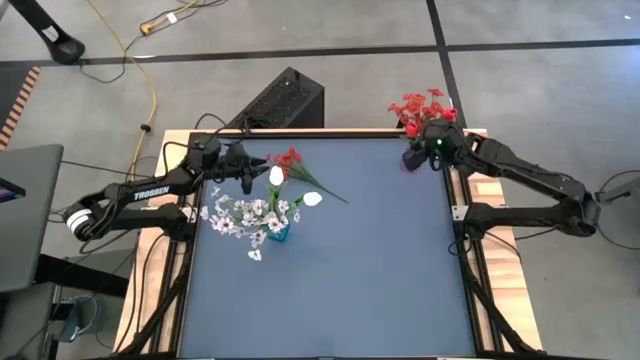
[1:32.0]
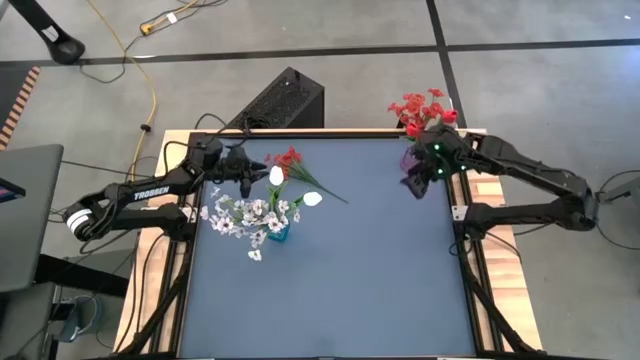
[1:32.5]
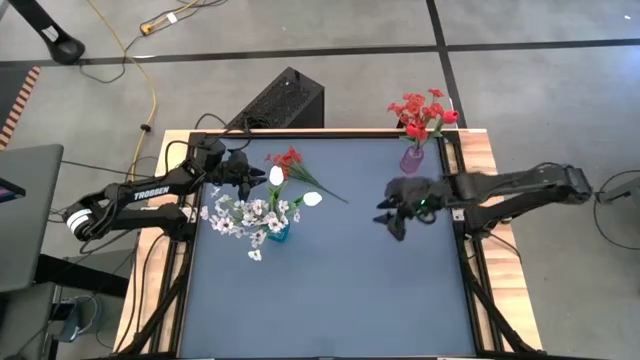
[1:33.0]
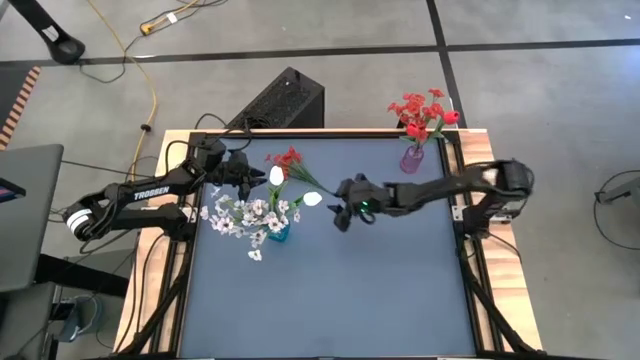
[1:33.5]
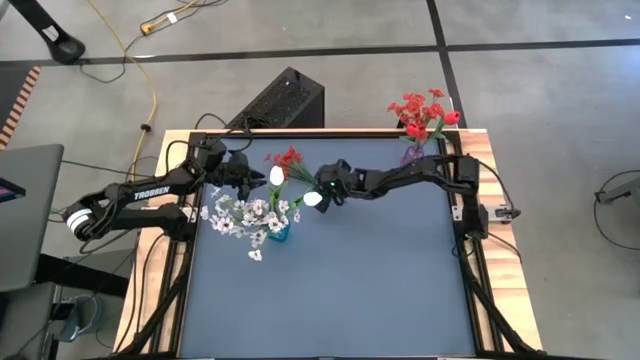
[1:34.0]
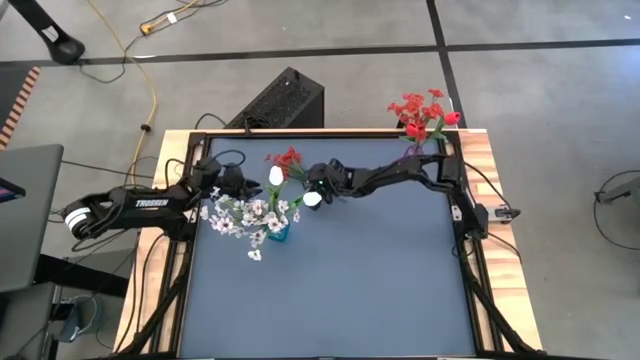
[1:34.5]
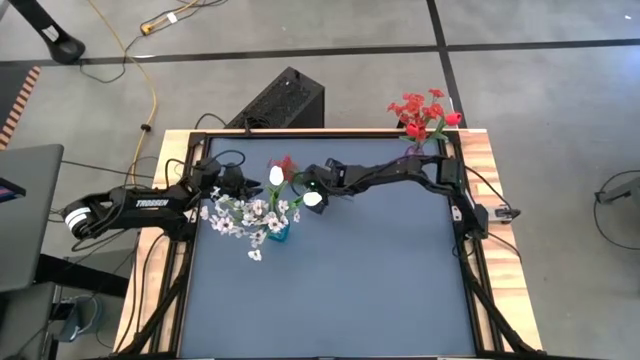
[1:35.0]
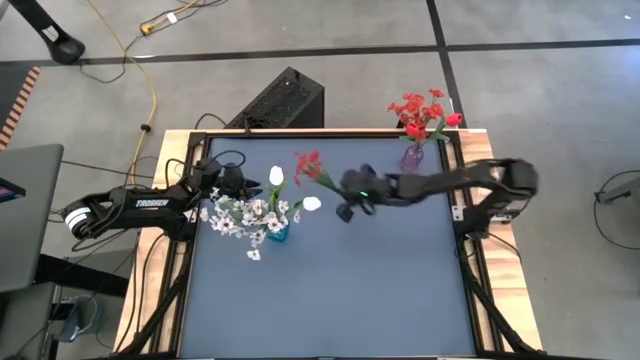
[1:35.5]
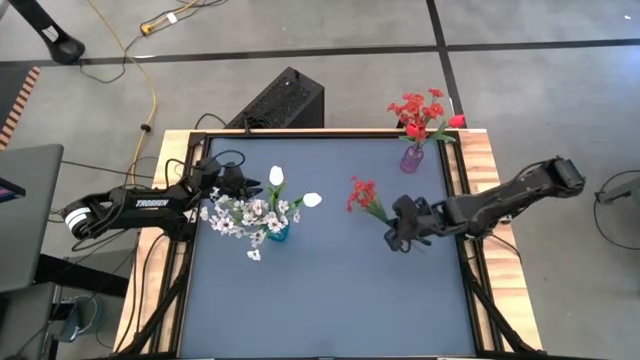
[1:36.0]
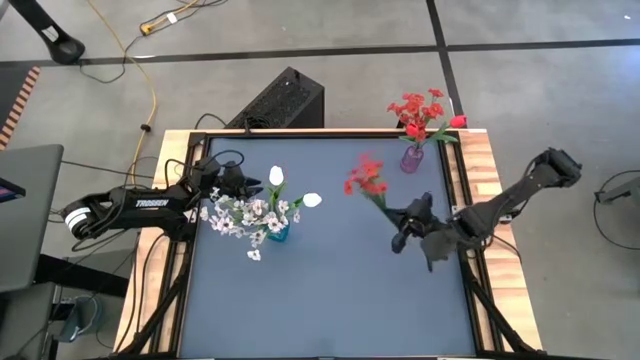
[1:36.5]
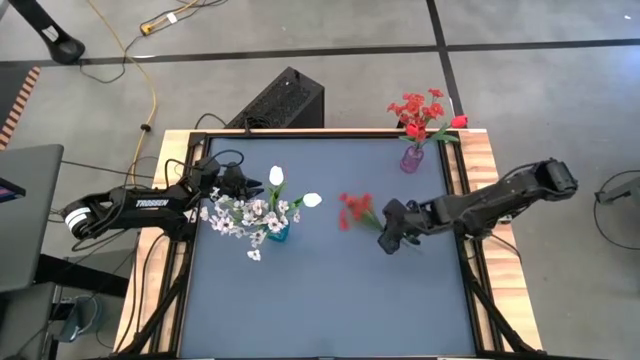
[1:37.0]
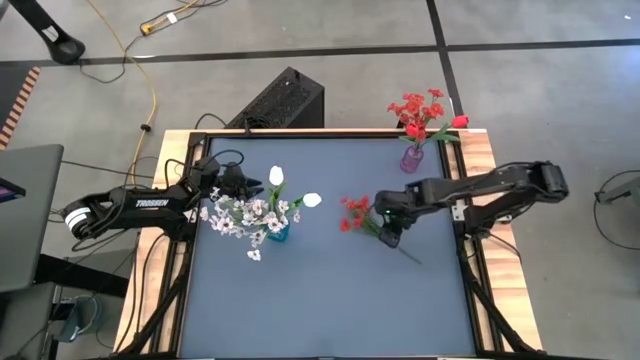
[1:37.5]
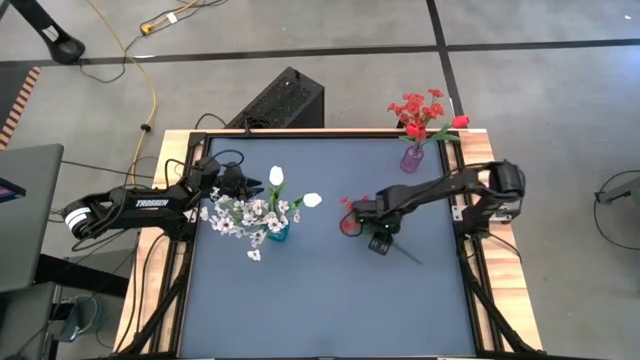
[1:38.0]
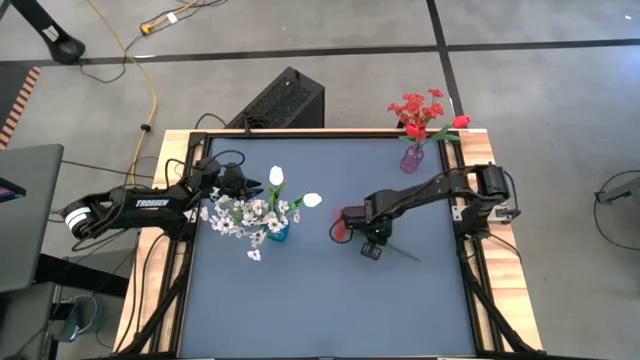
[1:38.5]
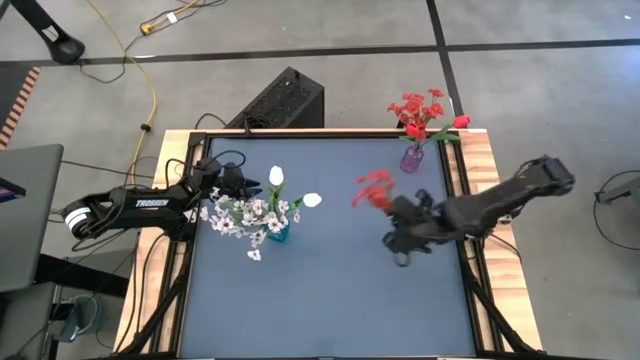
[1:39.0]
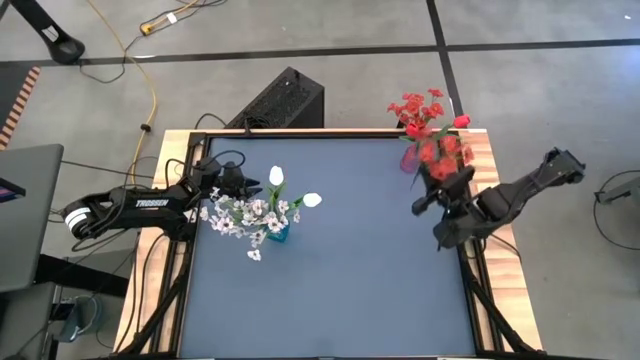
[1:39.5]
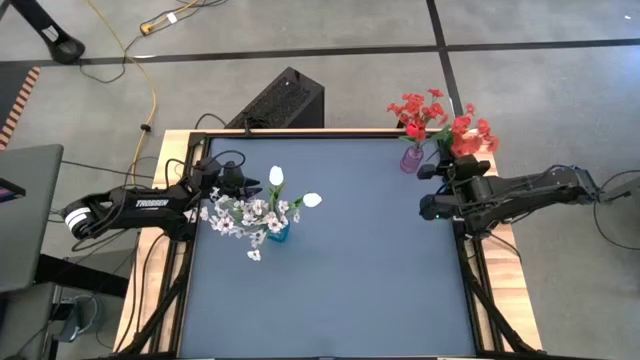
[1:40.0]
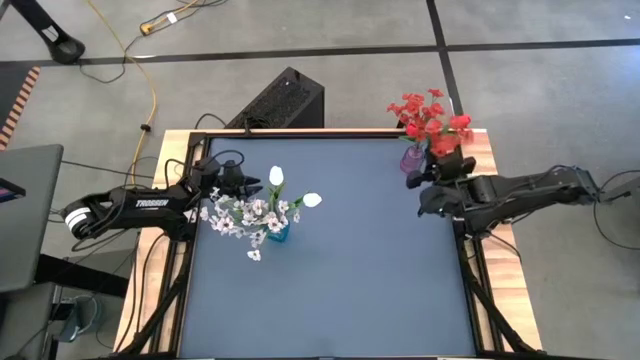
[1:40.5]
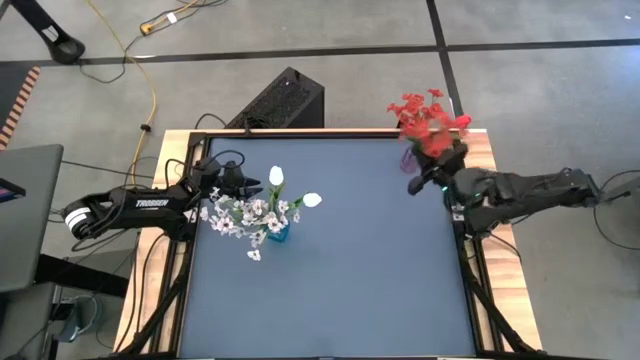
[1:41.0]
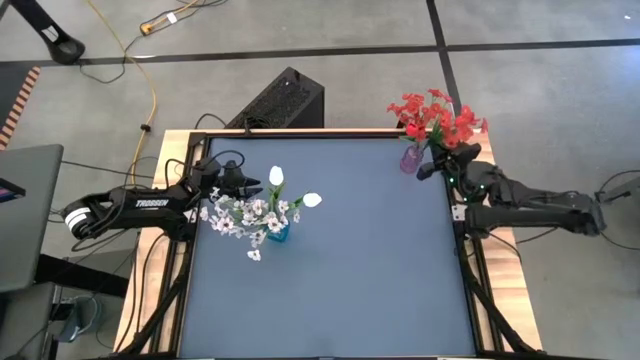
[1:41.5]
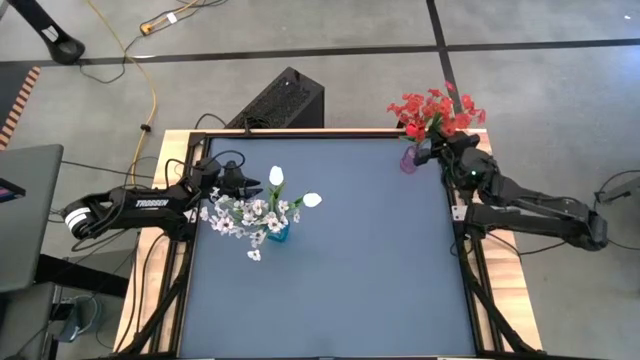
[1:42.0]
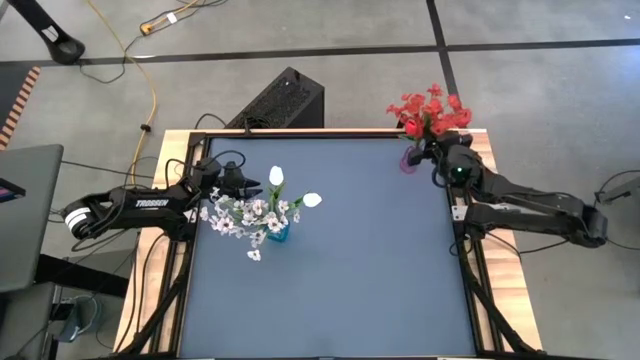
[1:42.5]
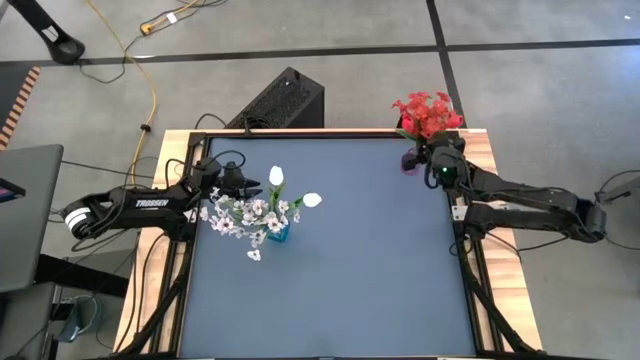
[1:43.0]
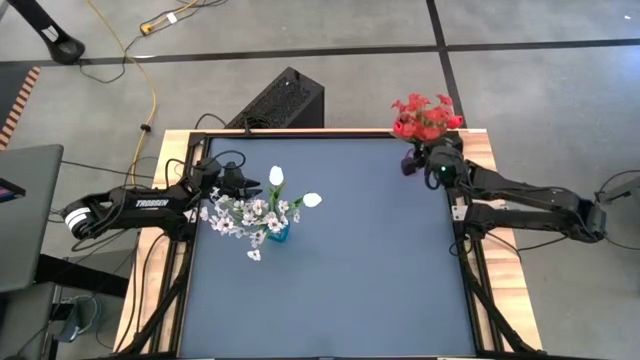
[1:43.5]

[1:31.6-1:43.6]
Task: Sort flowers into vase by color
Put the red flowers into the purple vase

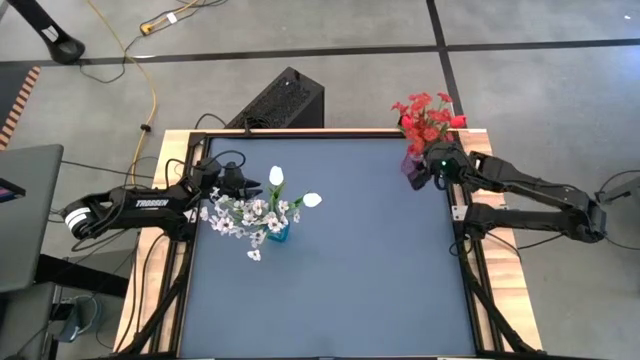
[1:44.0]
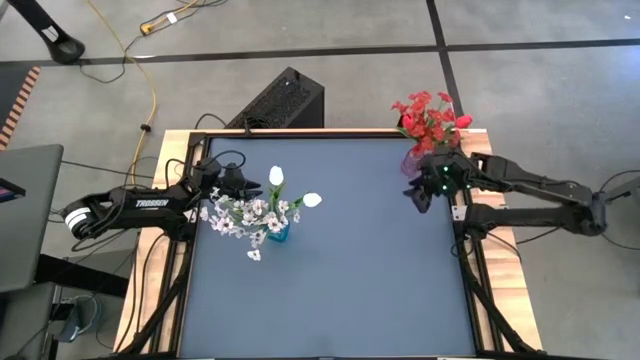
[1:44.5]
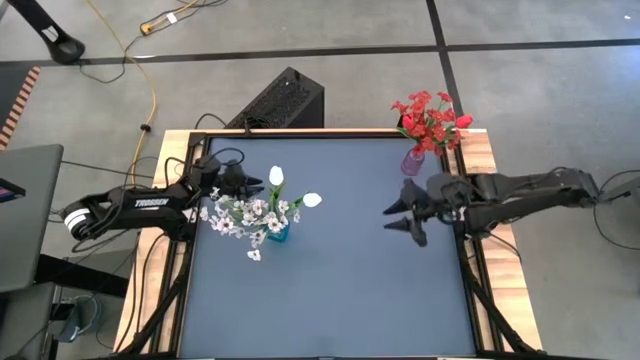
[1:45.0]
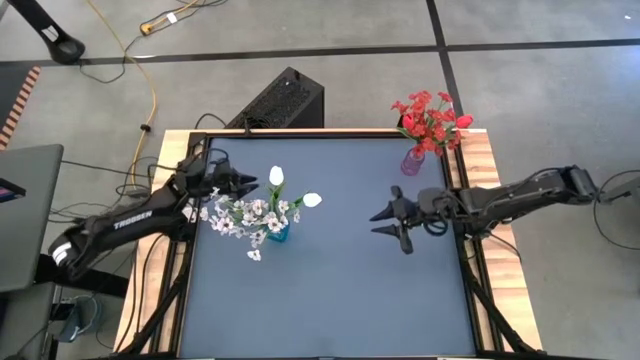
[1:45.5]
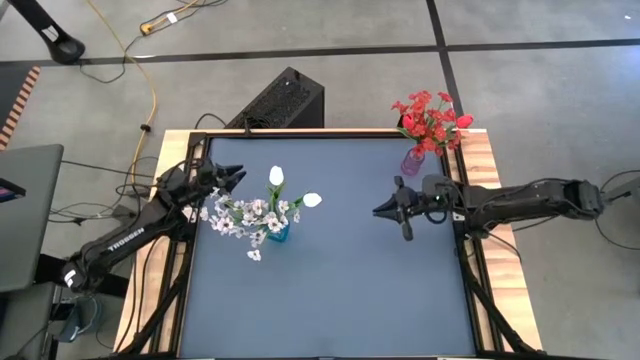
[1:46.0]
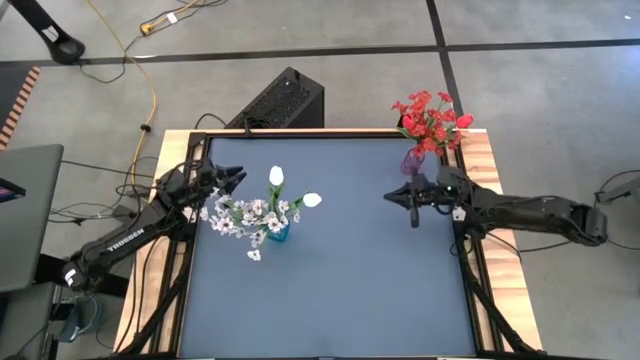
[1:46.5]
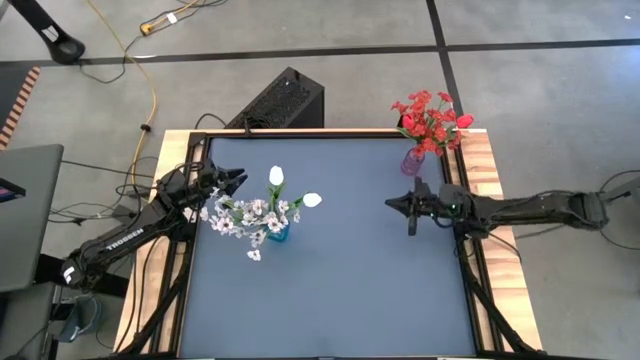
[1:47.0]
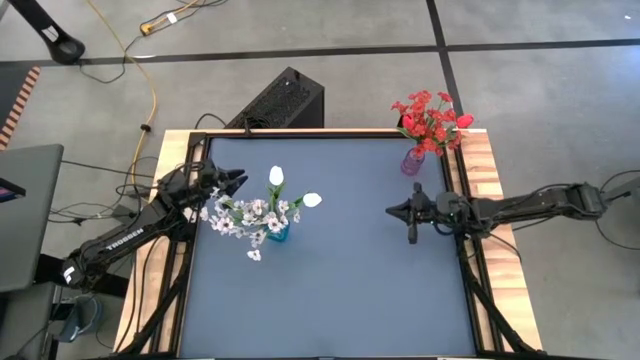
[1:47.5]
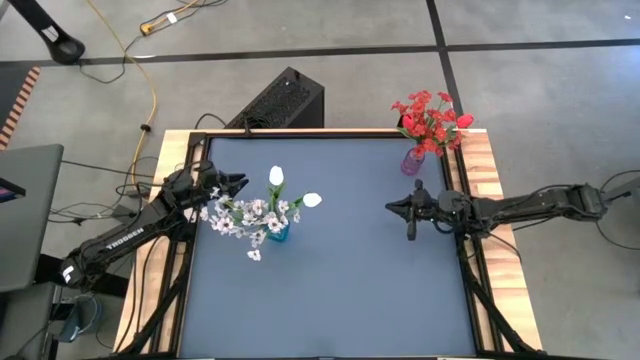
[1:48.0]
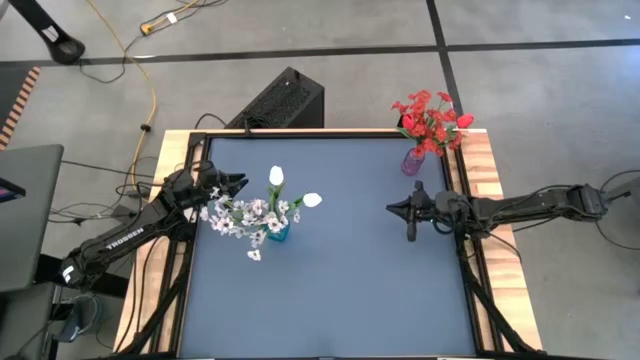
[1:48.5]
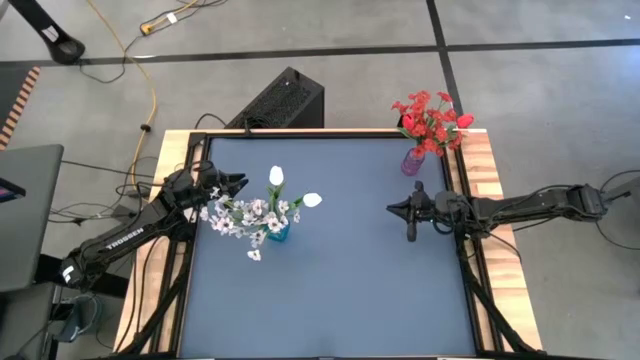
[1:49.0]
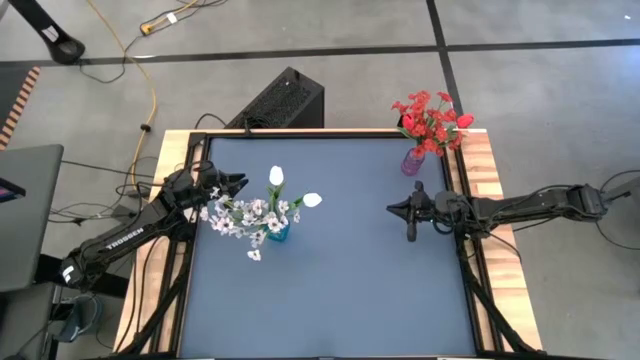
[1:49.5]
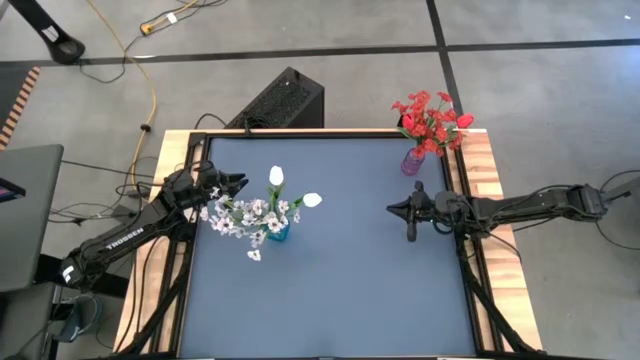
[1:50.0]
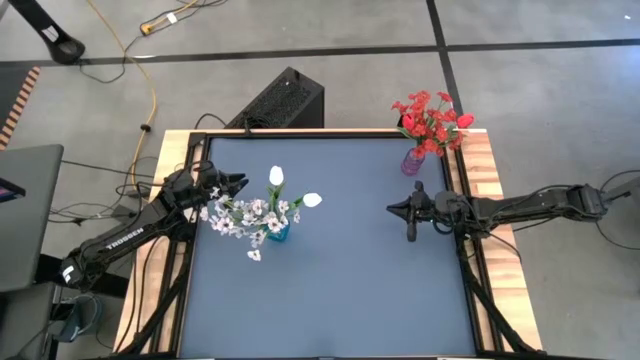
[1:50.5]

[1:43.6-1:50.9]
Return to Home Position

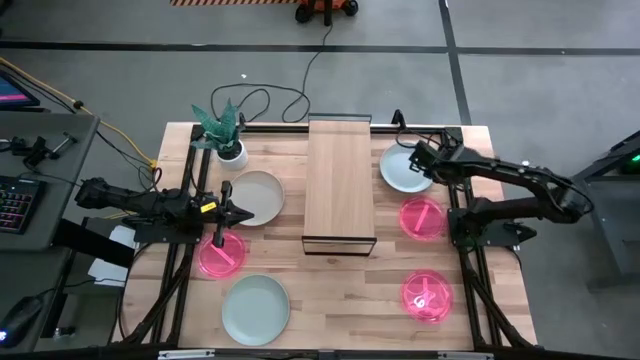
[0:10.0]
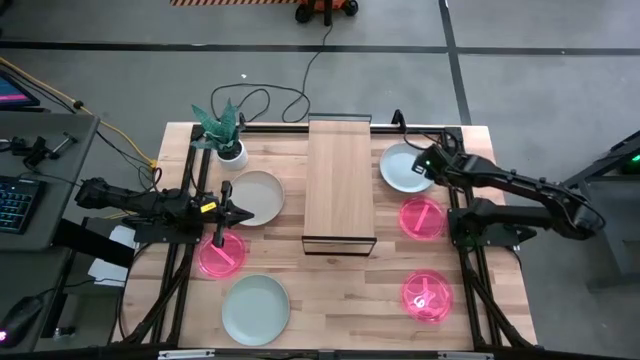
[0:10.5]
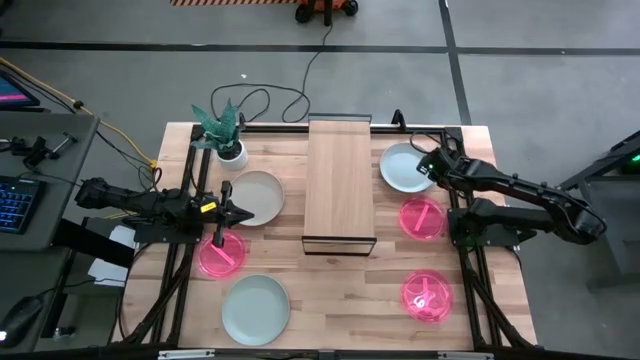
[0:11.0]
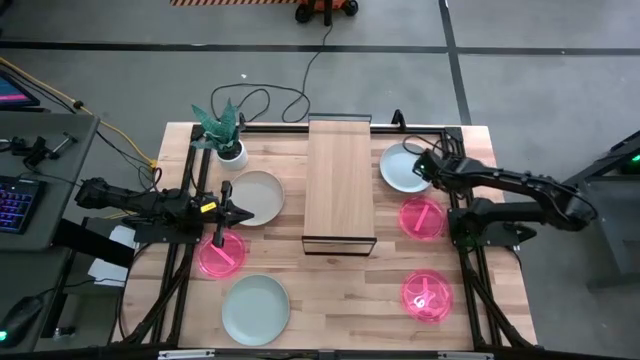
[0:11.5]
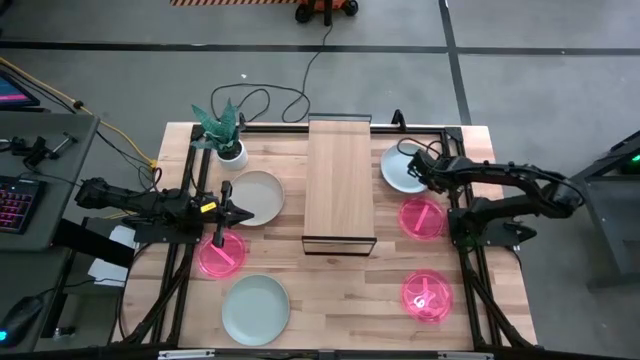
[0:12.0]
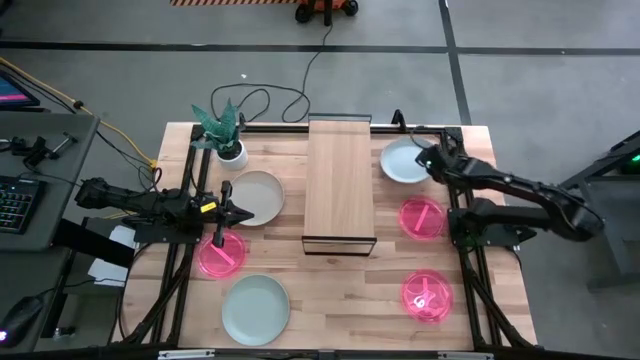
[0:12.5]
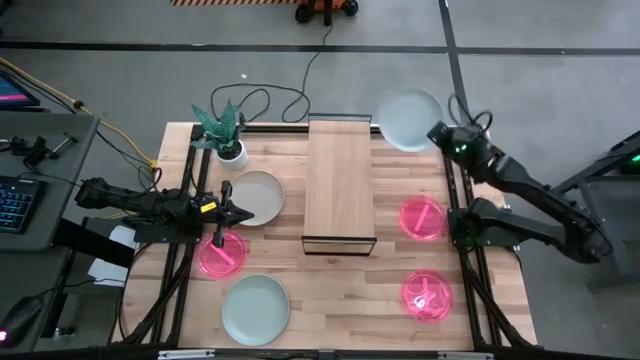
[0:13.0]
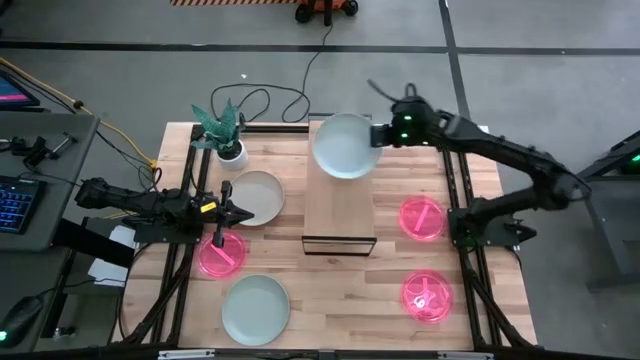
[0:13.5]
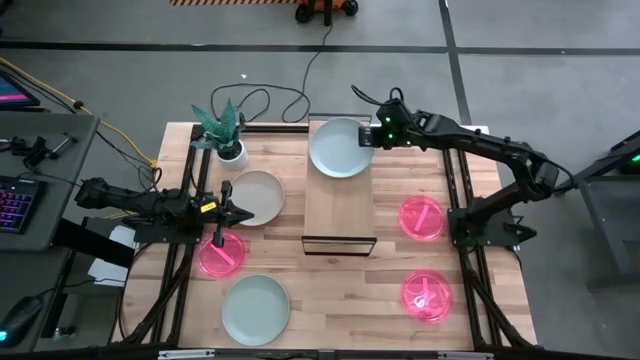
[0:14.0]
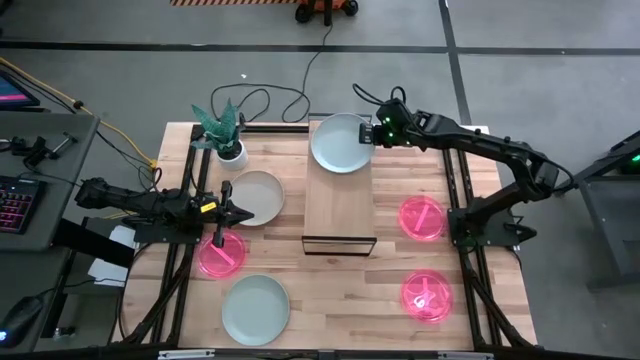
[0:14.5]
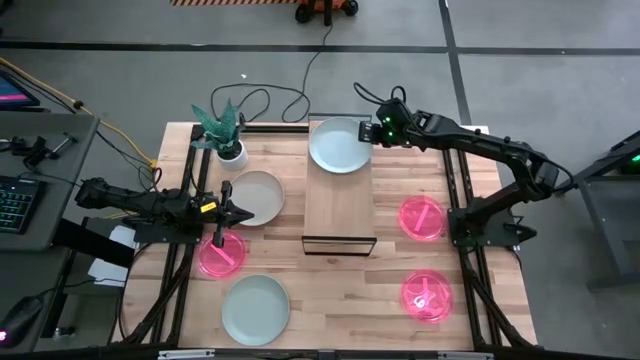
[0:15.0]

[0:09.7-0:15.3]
Task: Place and stack plates onto a shelf
Put the top white plate on the shelf
